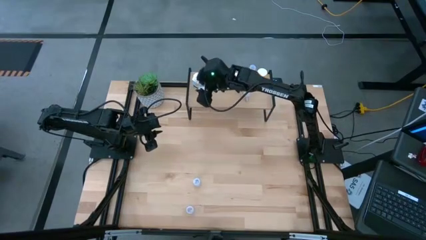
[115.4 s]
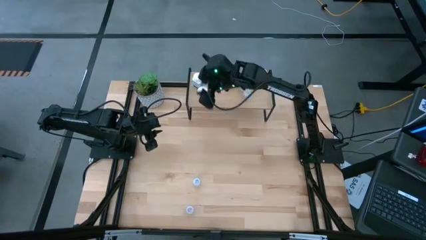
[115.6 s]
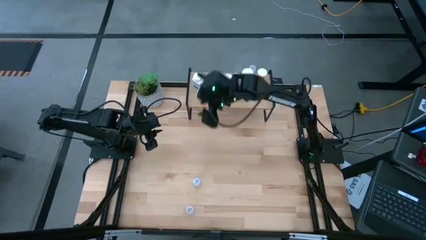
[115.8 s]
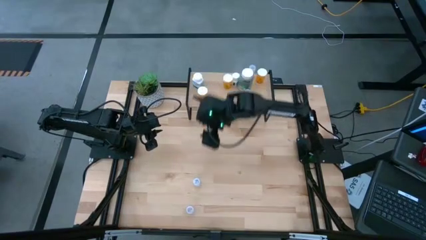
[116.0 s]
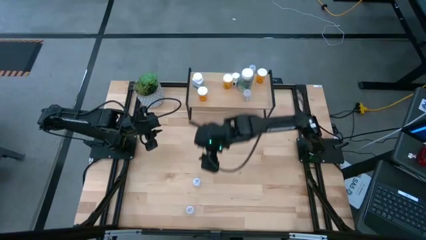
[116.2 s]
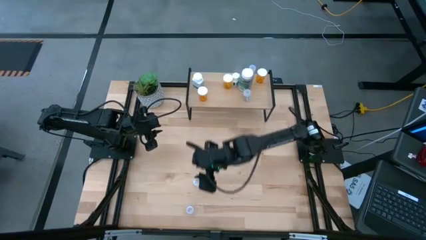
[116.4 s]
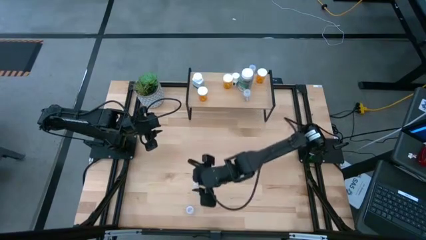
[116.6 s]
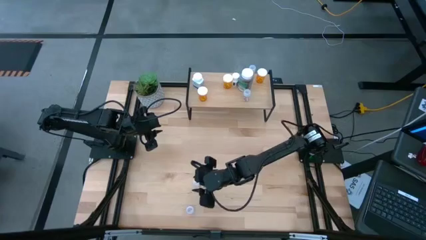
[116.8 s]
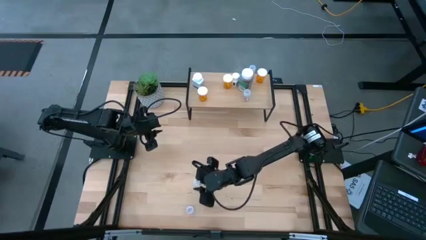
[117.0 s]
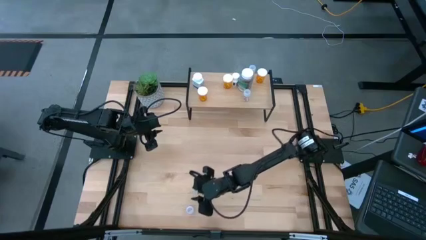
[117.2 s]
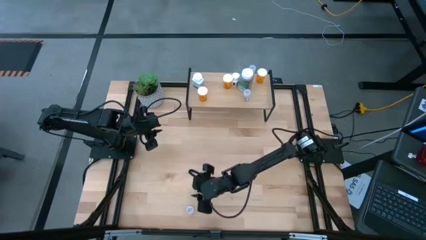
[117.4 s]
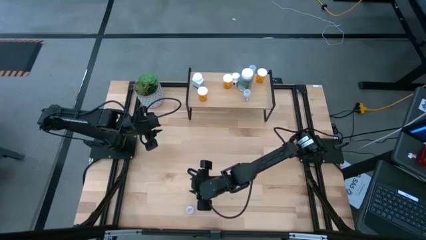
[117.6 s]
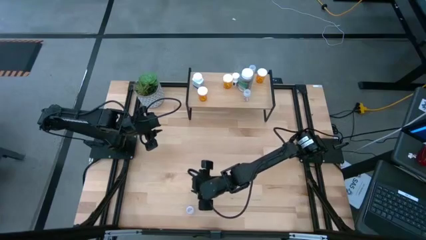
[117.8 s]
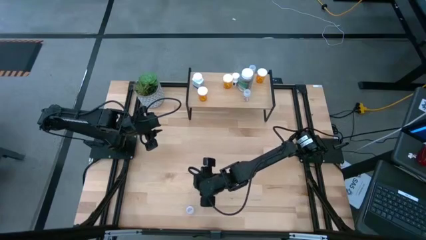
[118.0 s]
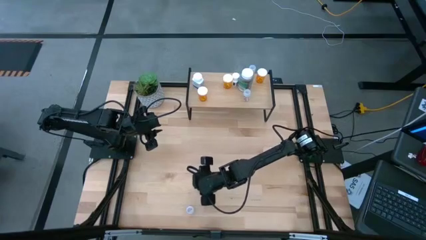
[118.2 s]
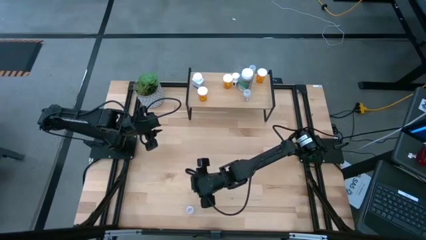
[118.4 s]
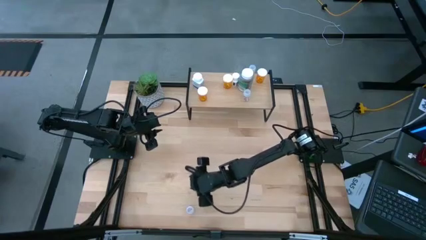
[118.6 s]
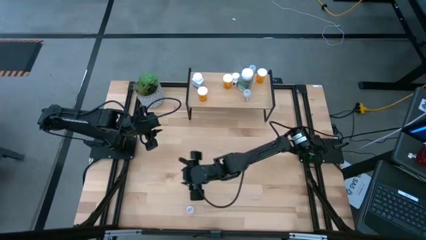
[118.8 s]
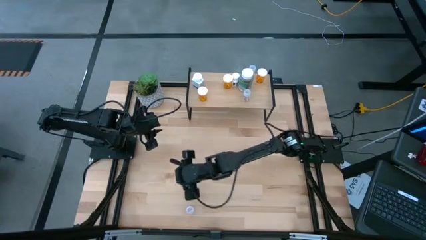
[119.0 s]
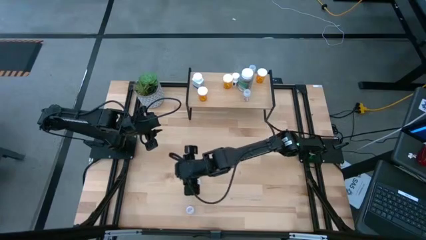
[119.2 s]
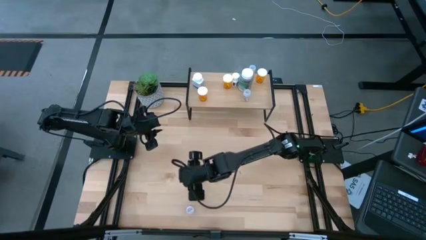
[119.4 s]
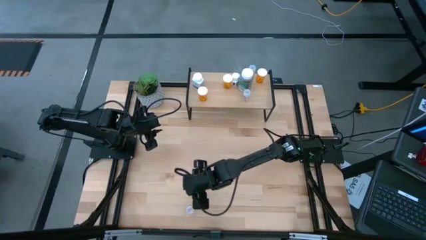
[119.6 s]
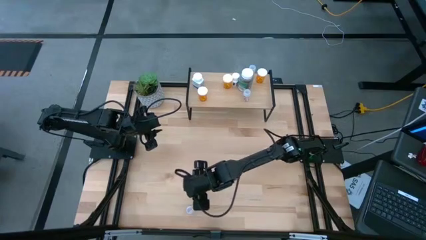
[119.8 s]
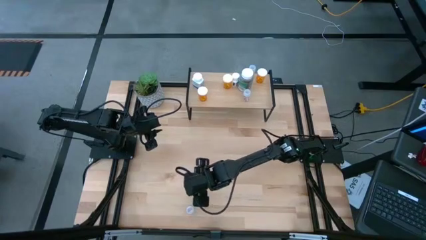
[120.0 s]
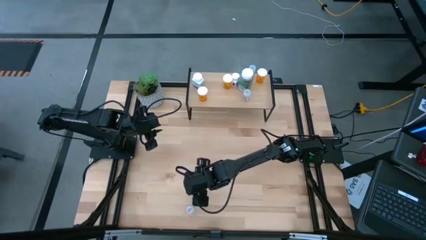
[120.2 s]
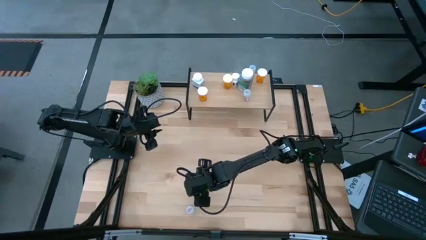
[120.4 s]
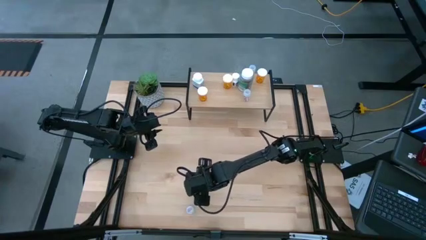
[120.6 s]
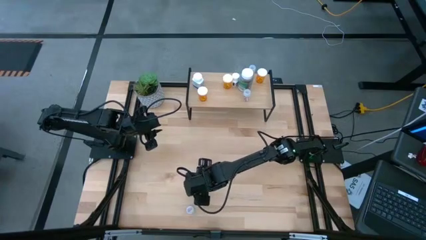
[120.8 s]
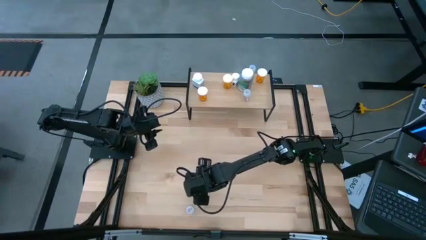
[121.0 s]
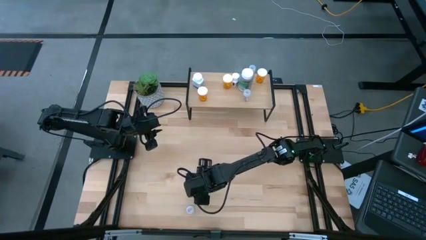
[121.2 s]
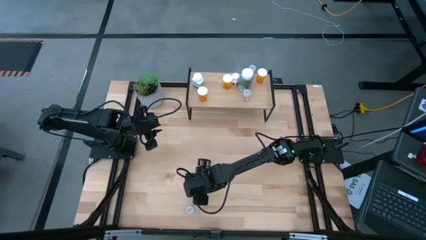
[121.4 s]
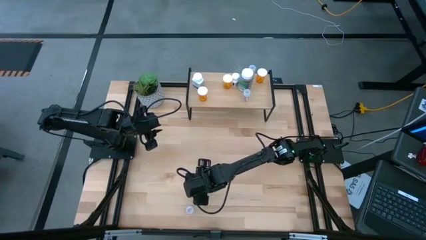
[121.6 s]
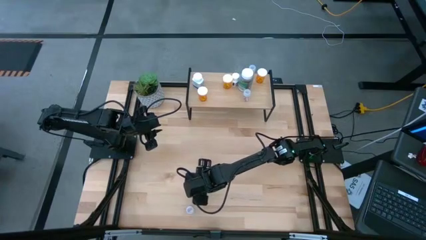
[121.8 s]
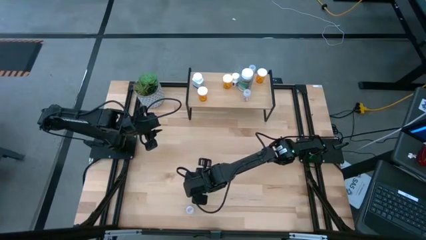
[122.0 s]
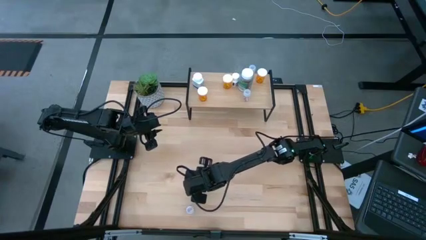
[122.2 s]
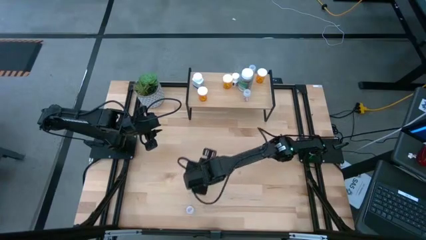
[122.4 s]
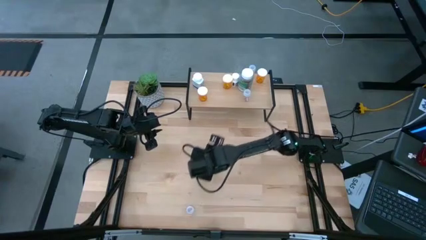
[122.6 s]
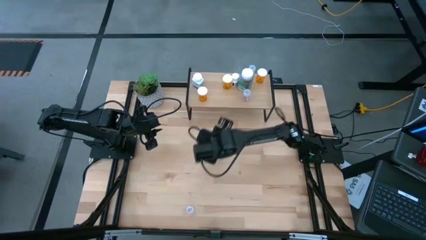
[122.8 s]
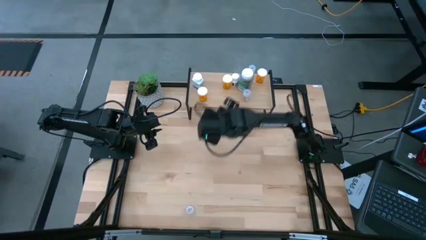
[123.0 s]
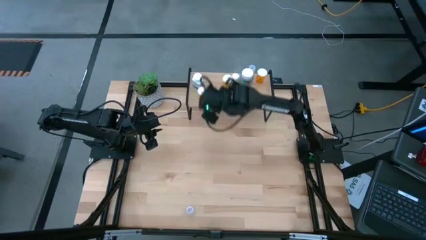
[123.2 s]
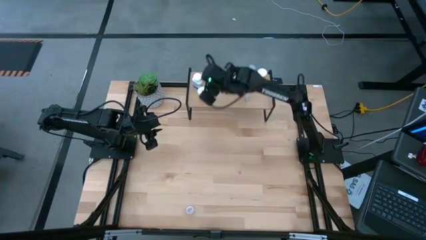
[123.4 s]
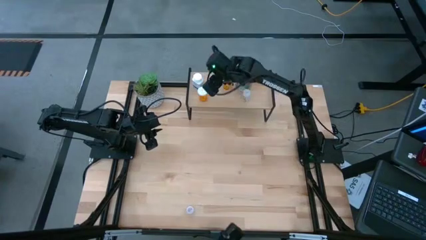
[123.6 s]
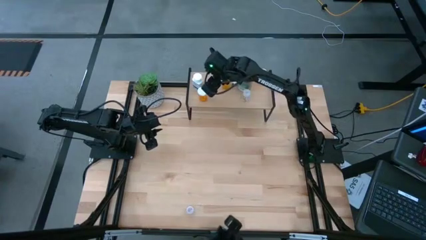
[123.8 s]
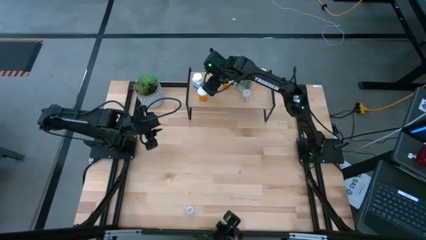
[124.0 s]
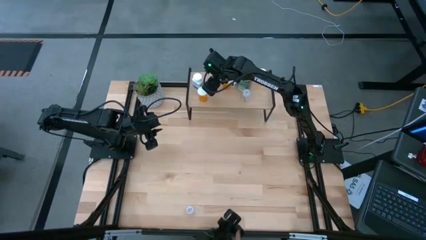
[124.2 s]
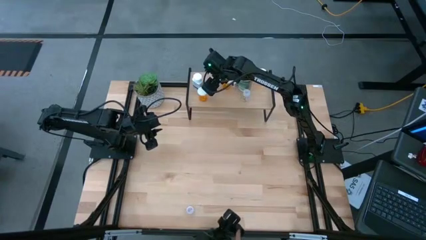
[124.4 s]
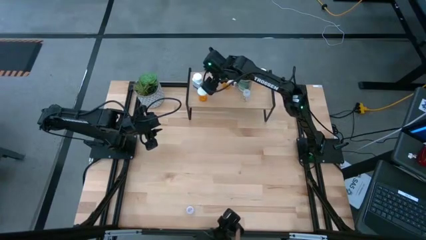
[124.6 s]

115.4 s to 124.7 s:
Task: Pick and place medicine bottles onto shelf by color
Put the transparent pill bottle on the shelf

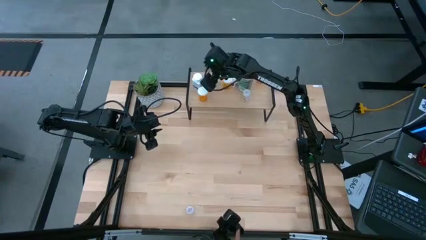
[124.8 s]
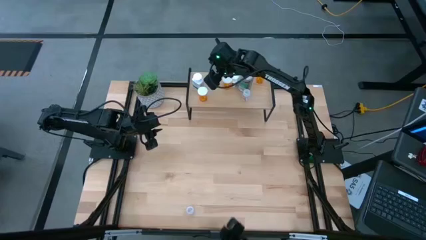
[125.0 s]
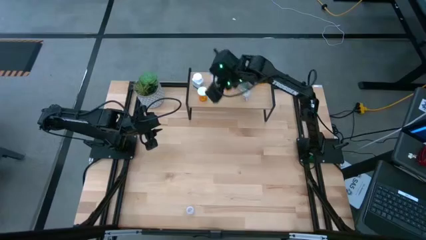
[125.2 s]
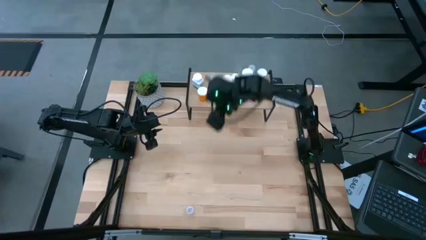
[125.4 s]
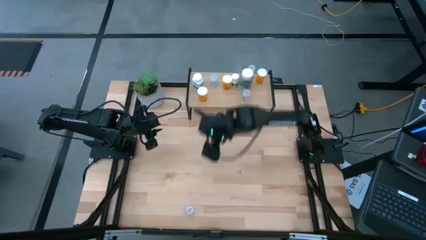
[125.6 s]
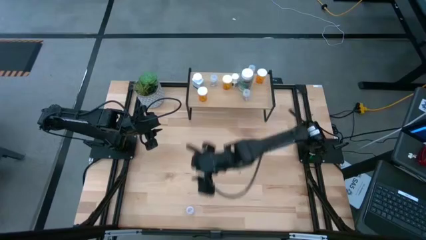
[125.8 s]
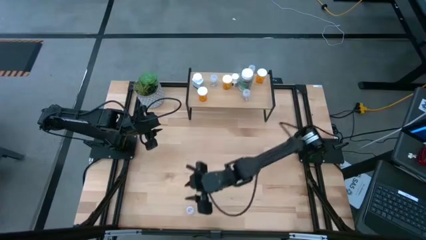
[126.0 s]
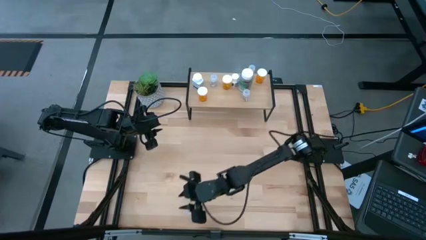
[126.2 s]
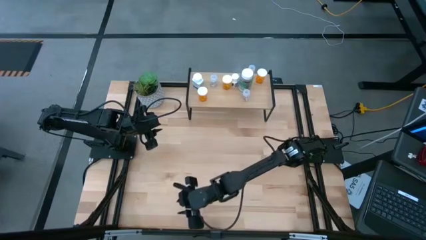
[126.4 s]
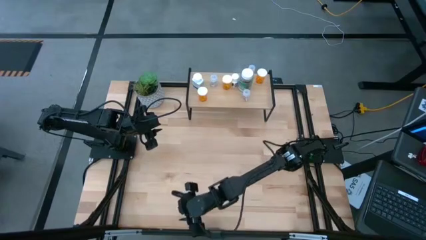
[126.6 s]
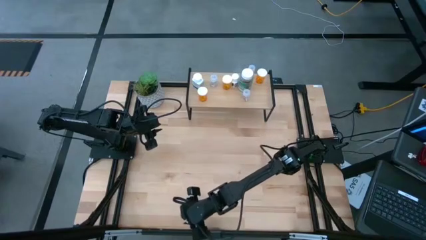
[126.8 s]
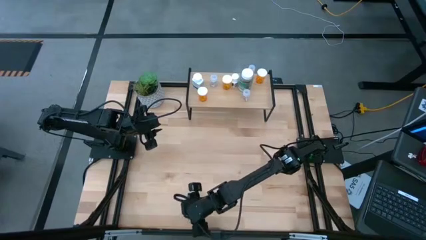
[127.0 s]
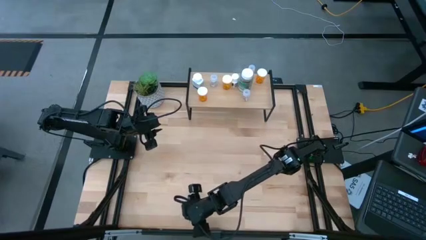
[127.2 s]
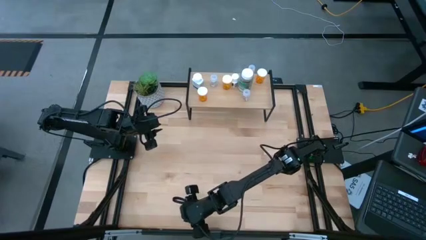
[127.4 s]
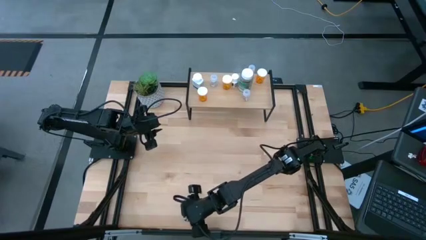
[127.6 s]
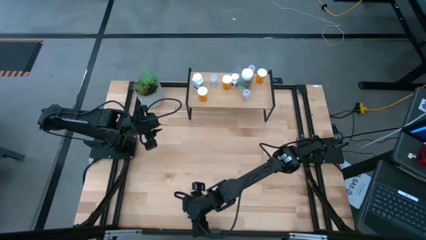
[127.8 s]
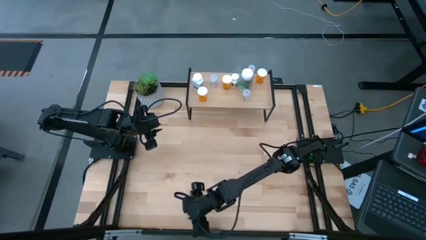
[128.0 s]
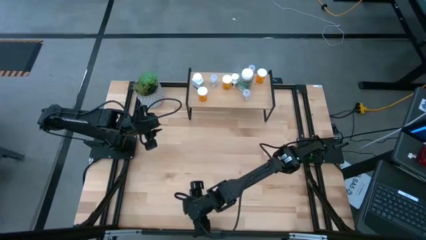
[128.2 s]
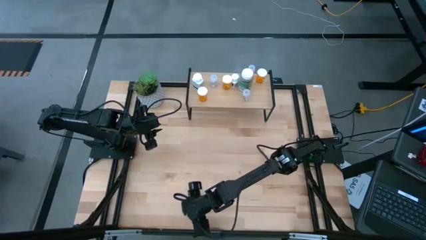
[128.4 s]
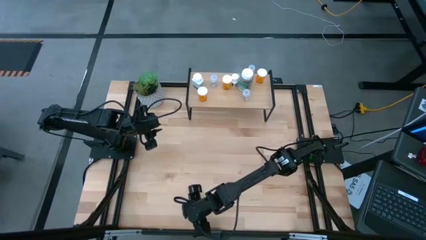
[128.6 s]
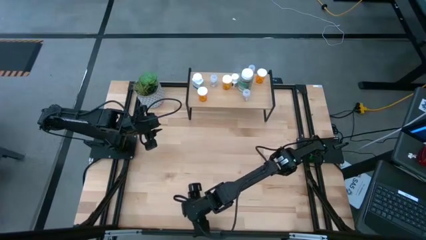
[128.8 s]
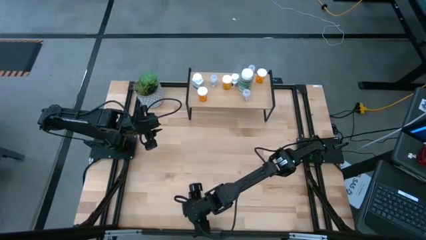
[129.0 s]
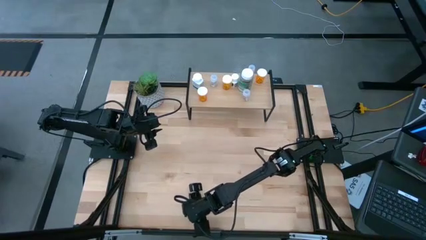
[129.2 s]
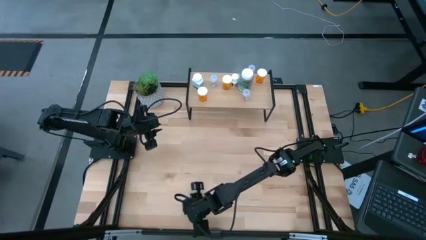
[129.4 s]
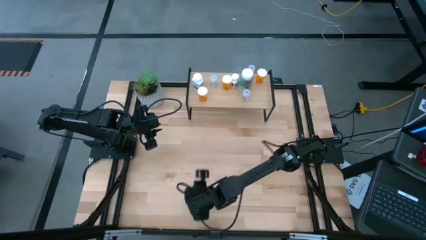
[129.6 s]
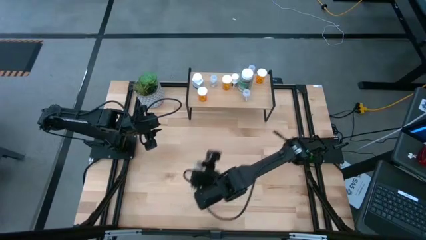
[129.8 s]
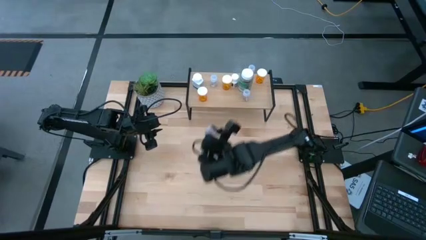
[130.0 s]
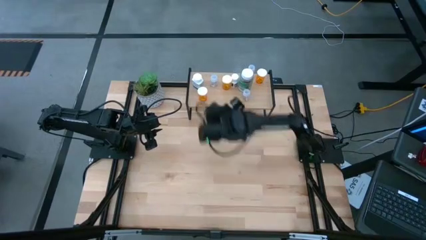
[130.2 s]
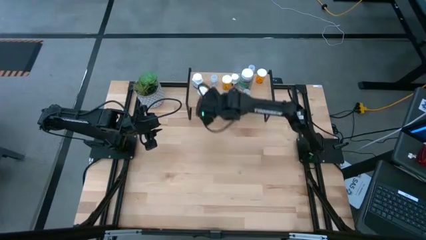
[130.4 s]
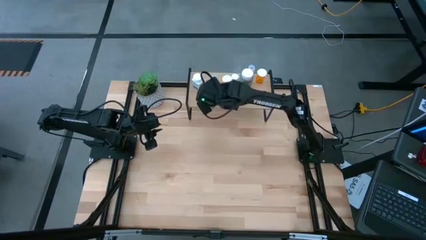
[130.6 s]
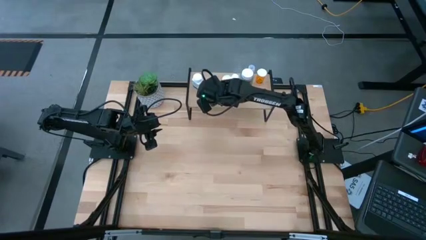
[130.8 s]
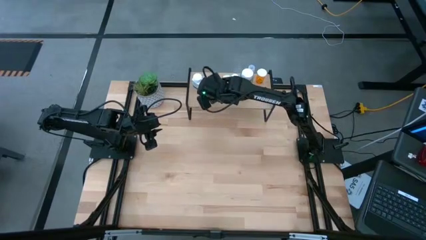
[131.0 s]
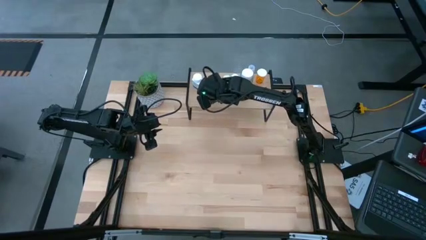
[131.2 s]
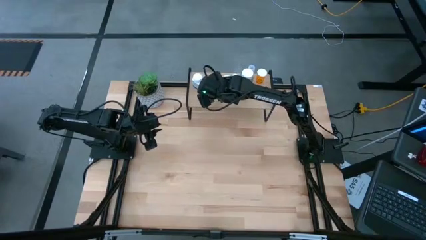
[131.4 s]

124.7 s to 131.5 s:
Put the transparent pill bottle on the shelf

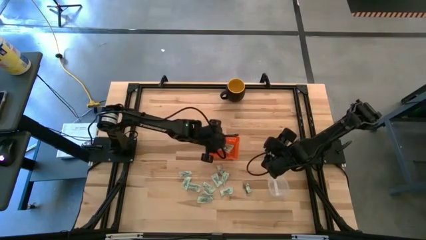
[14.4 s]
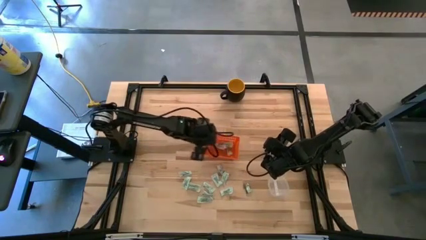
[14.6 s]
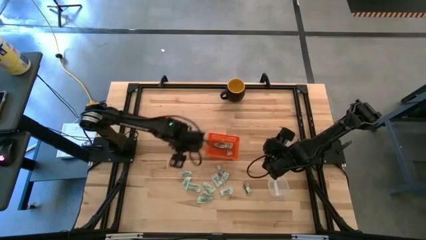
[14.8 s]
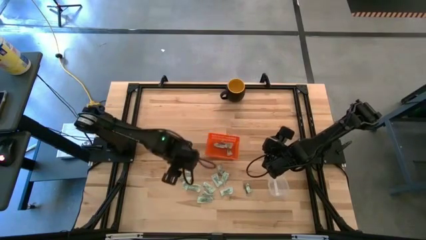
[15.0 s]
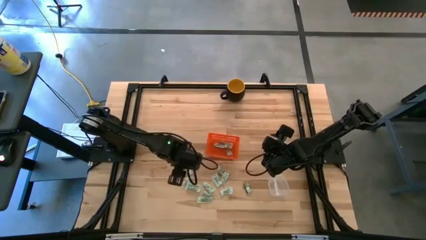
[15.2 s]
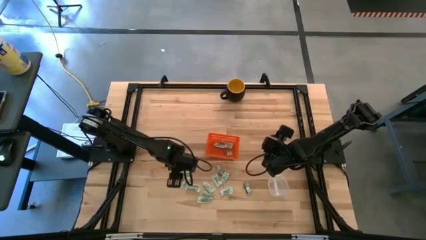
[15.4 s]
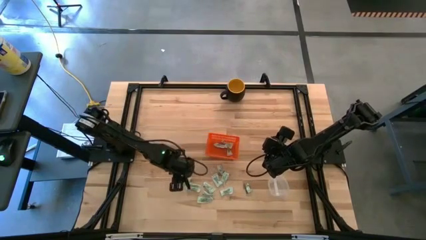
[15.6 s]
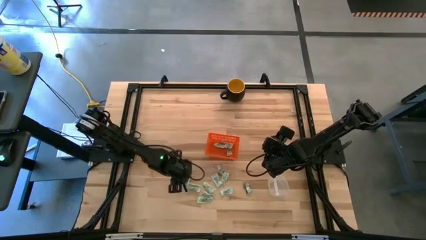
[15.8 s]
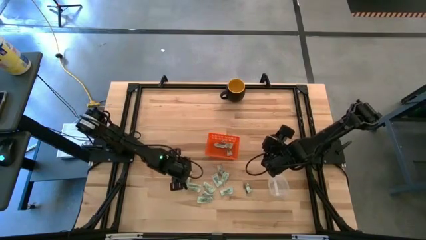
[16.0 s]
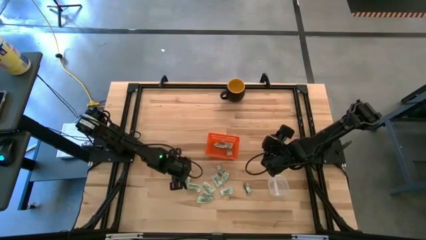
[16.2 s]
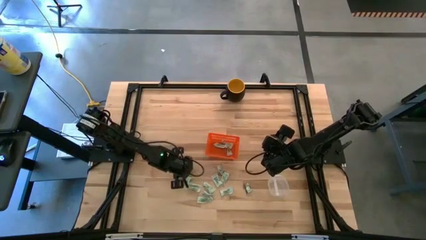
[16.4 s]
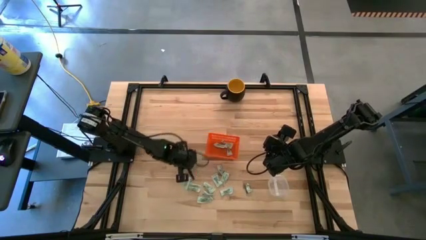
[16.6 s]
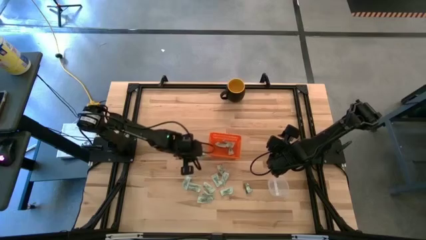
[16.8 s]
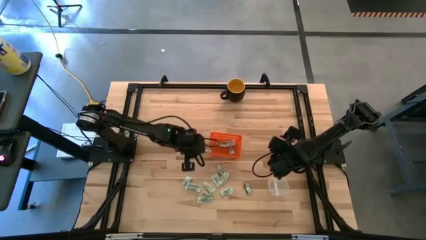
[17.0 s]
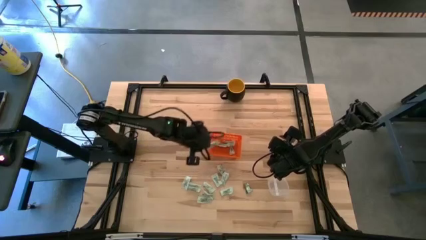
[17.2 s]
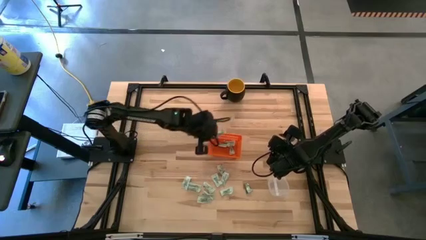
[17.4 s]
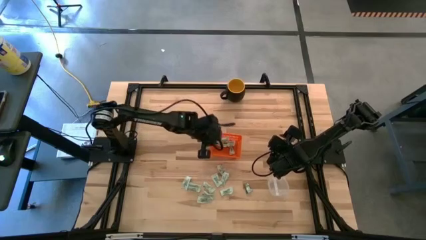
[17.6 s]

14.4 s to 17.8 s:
Task: Pick and place items into bin
Put the light green stevia packet into the orange bin
